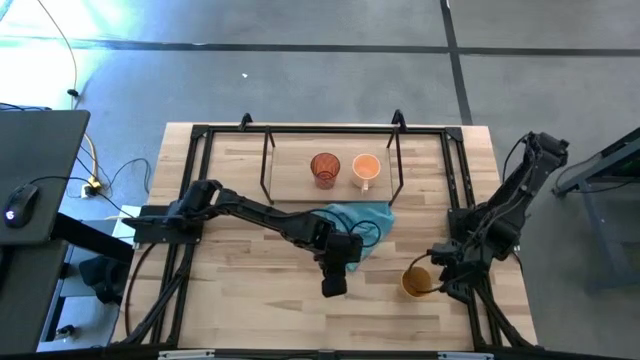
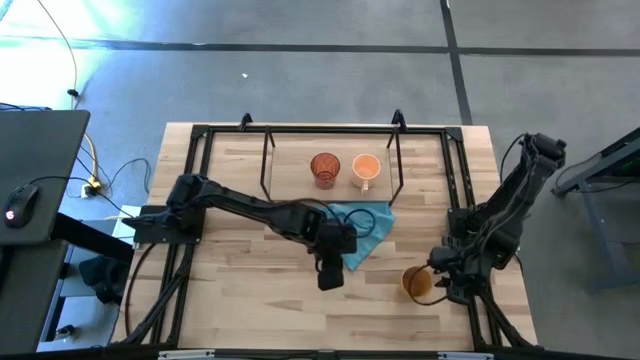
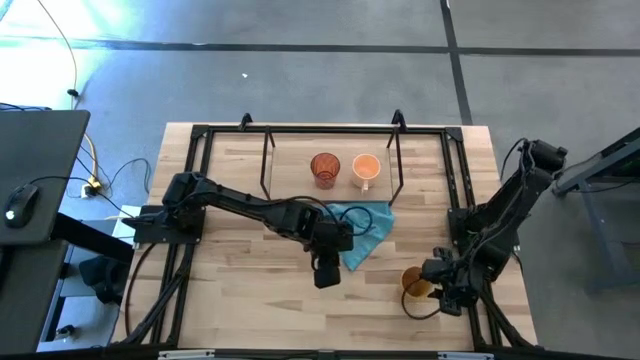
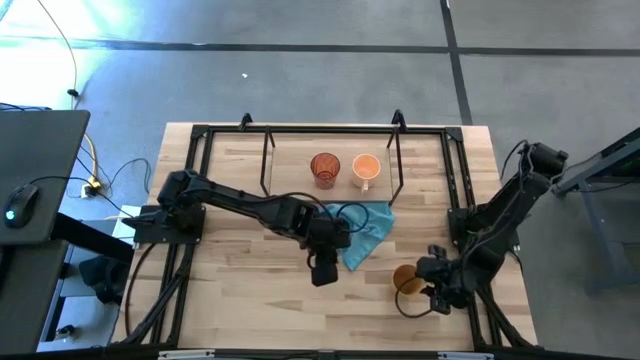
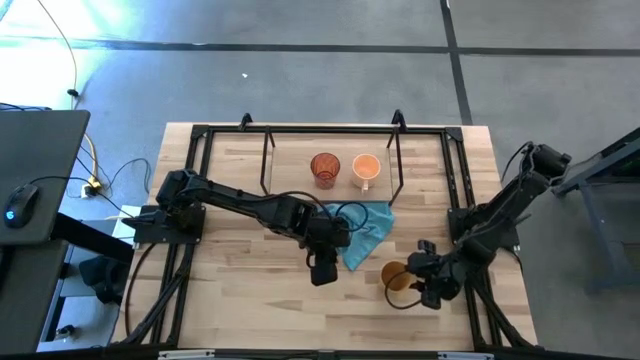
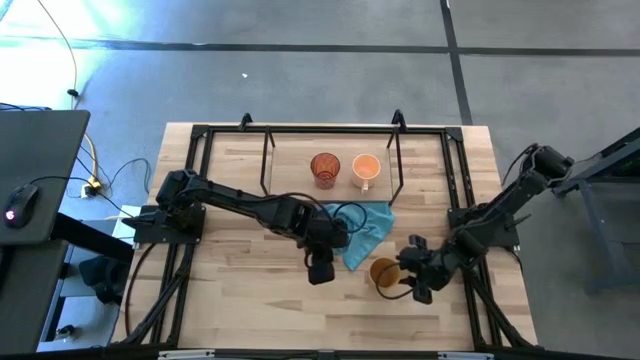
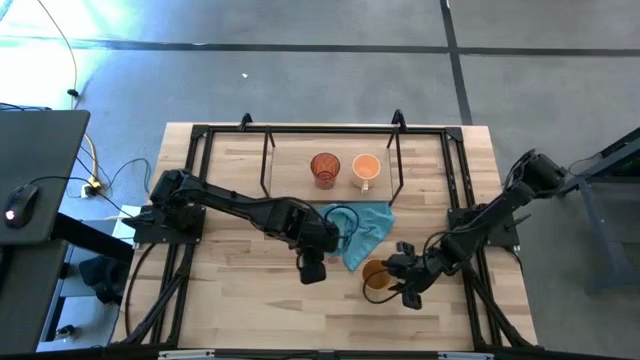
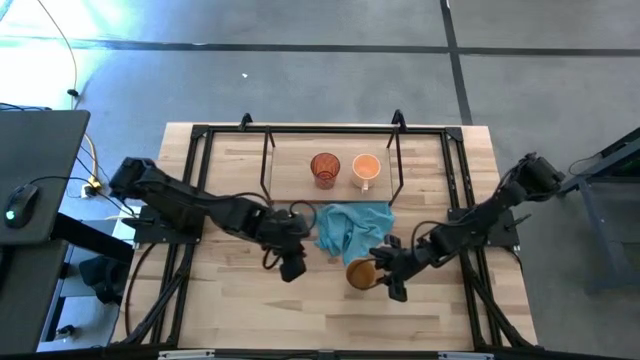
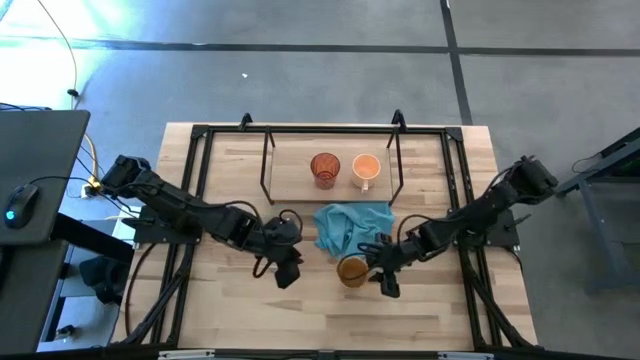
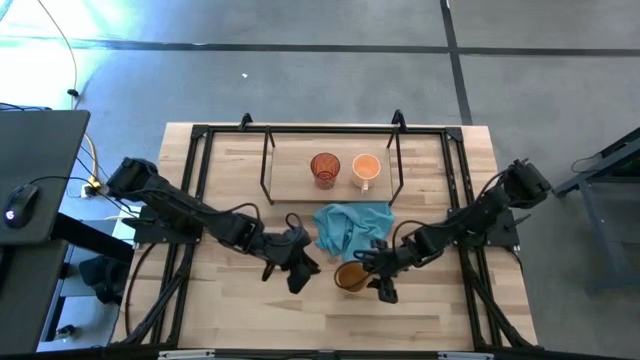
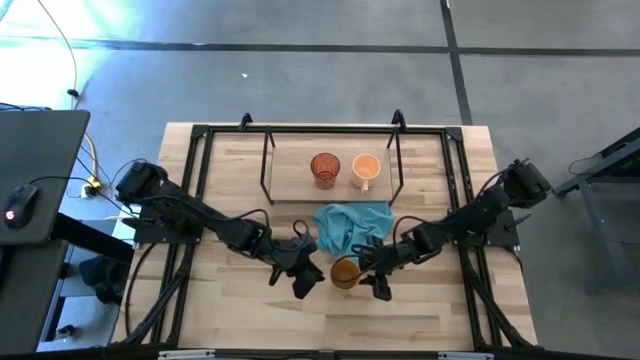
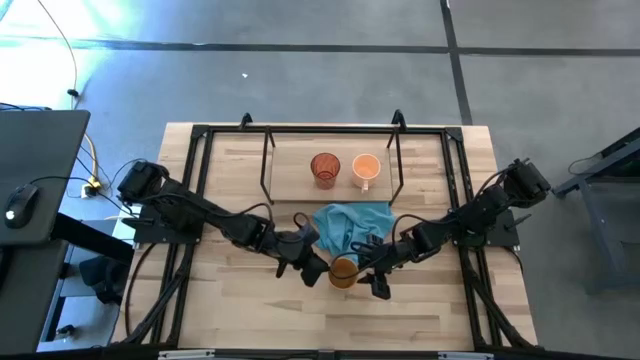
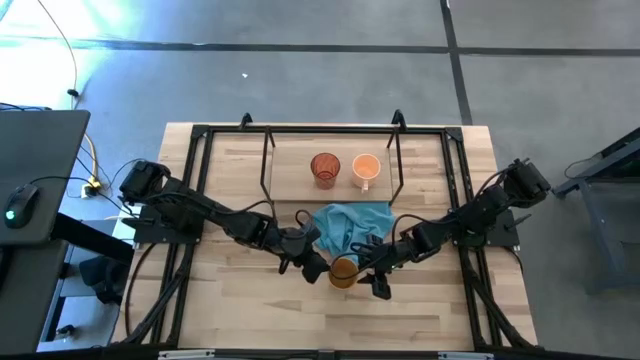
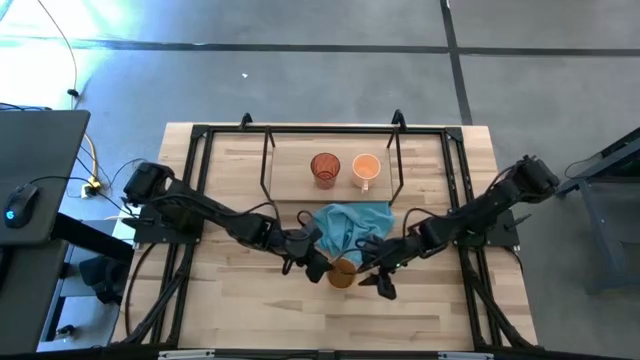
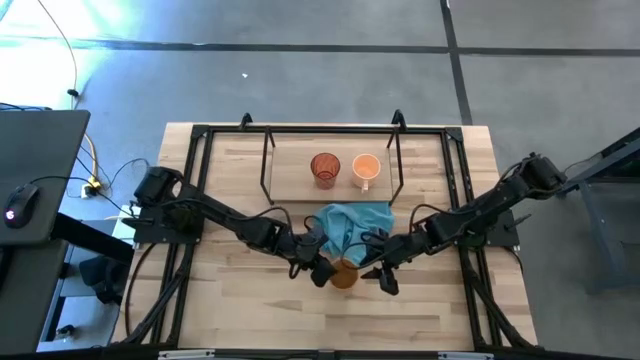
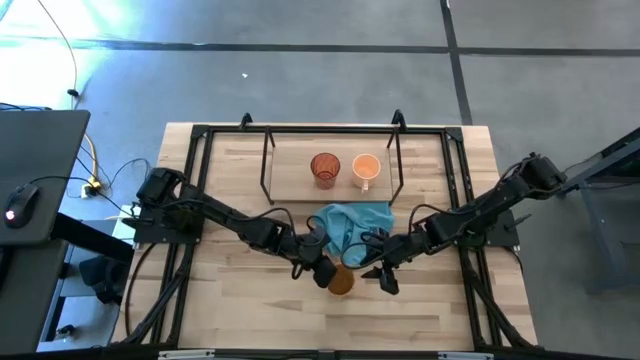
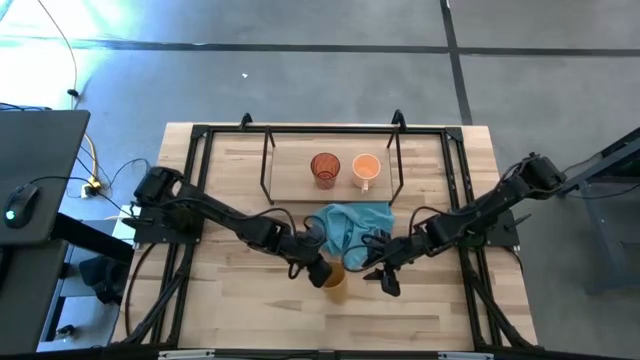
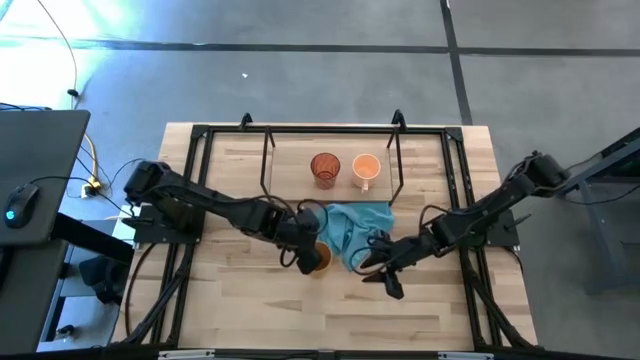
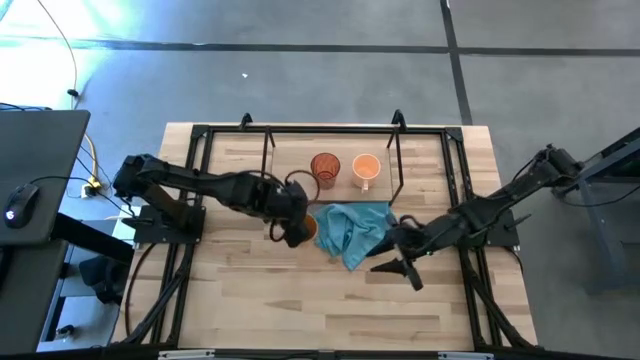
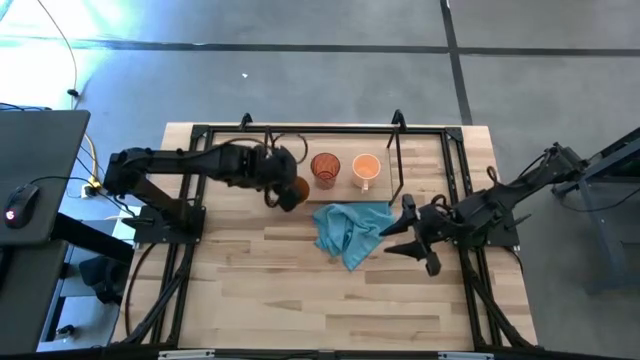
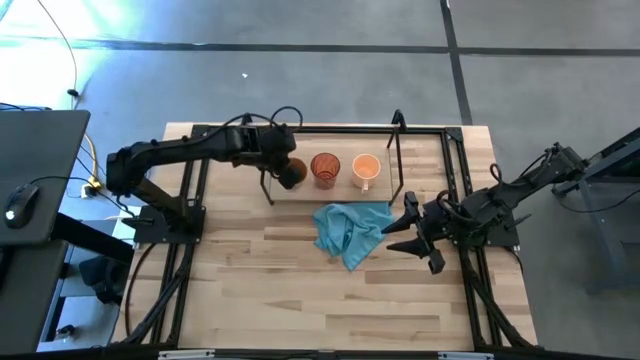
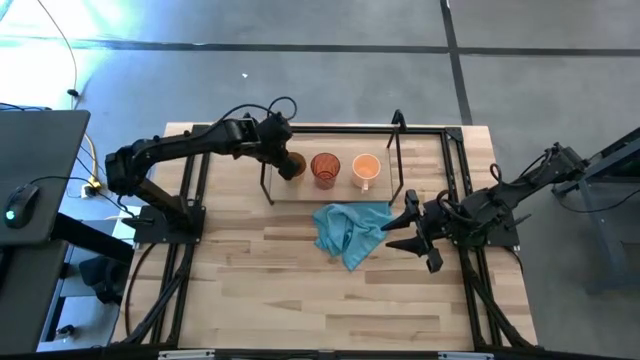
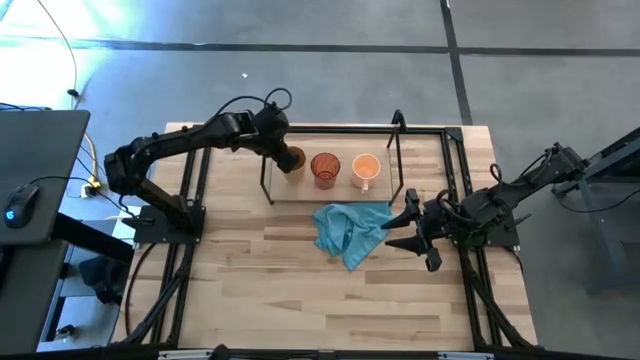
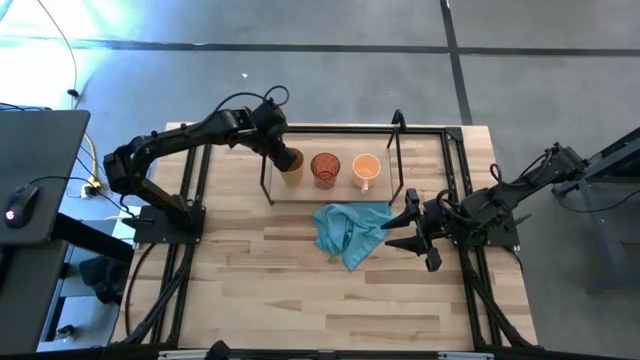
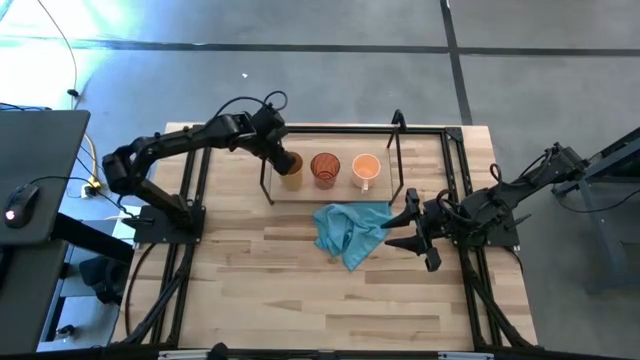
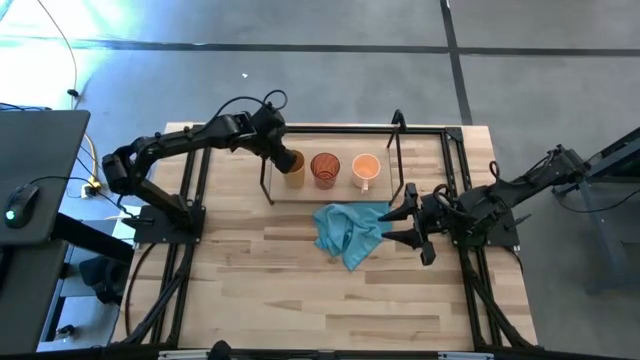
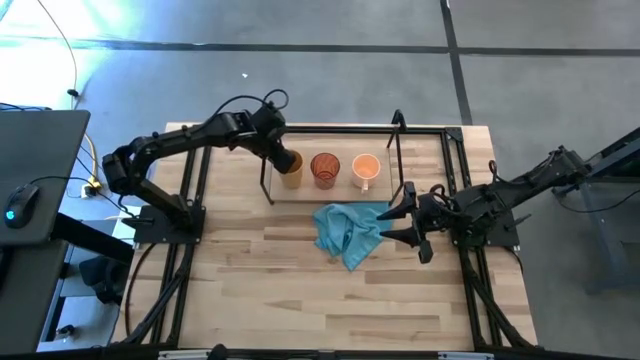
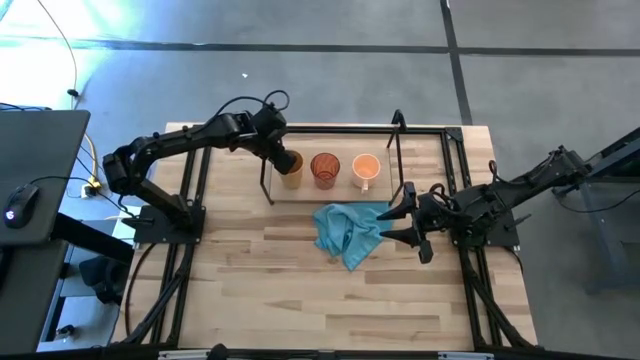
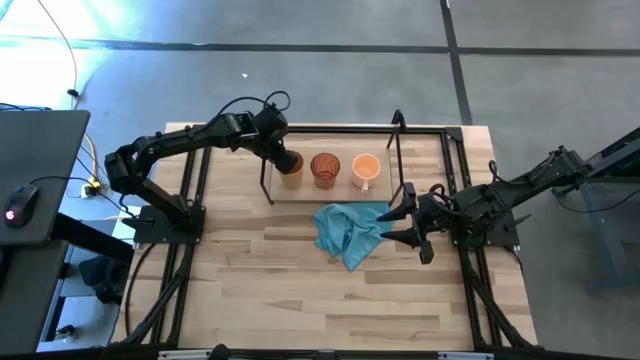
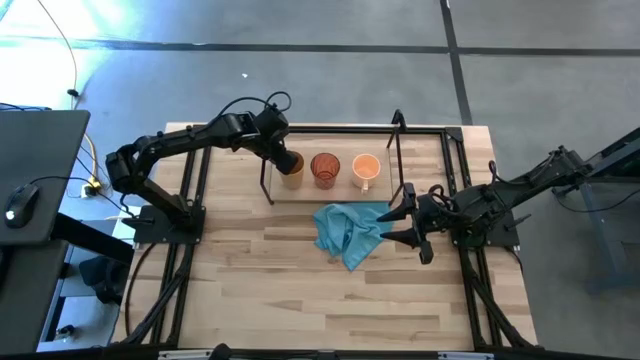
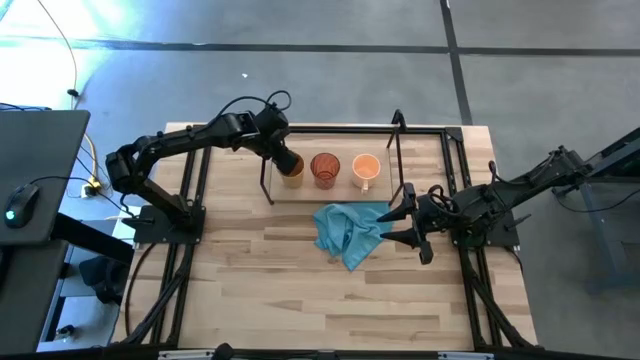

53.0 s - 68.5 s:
Task: Stack small to large cups/mugs on shelf
Put the yellow cup on the shelf

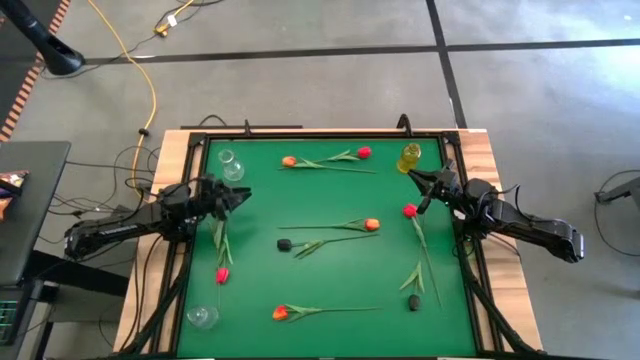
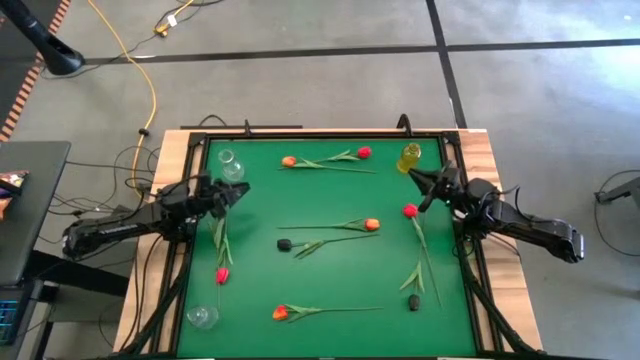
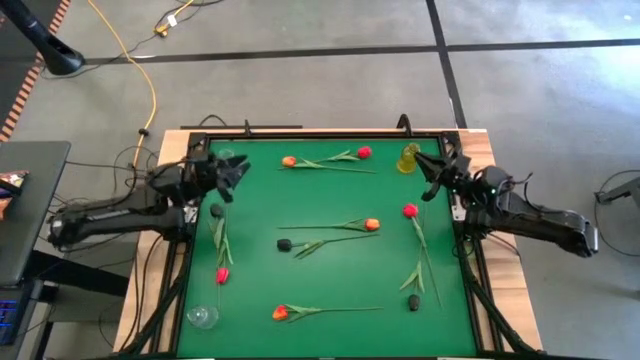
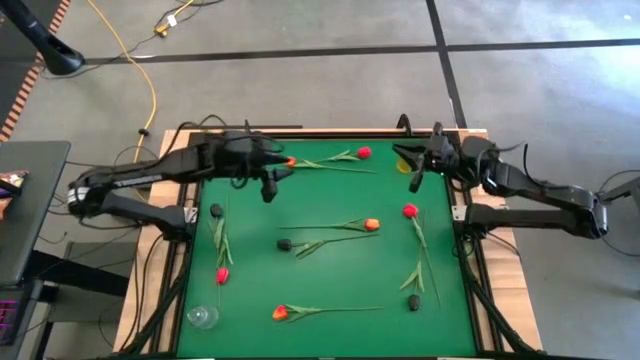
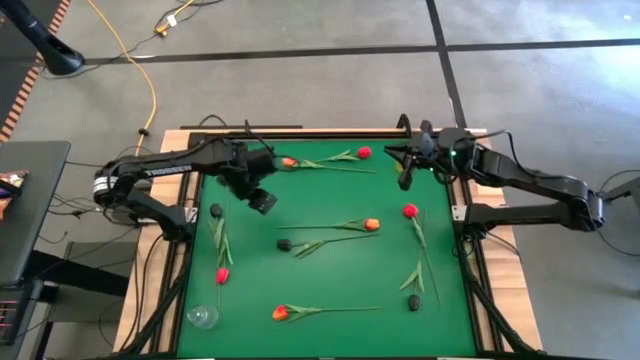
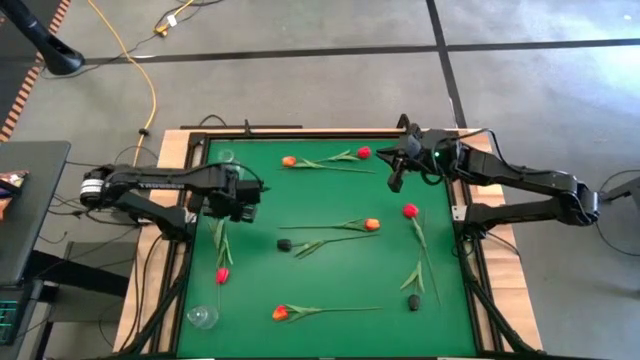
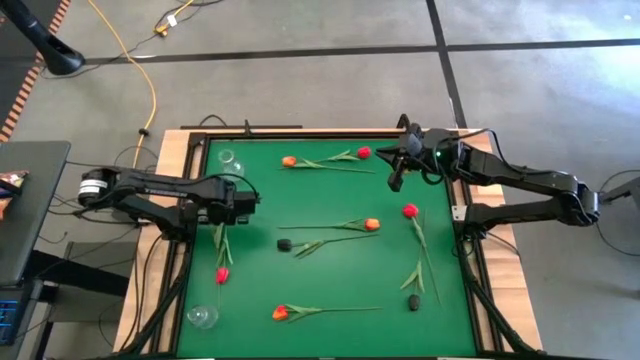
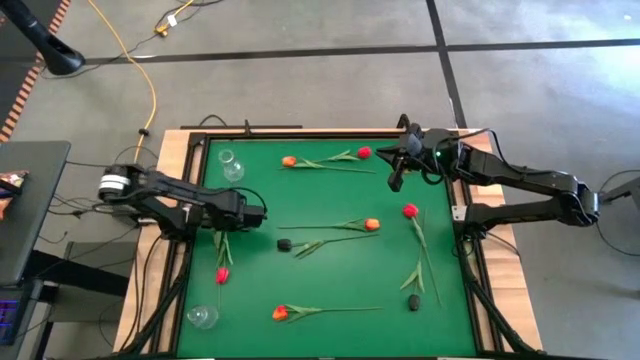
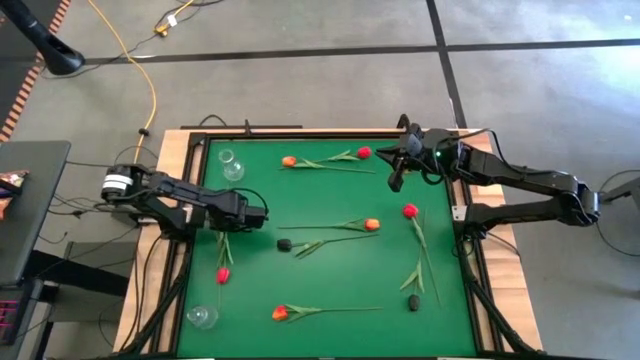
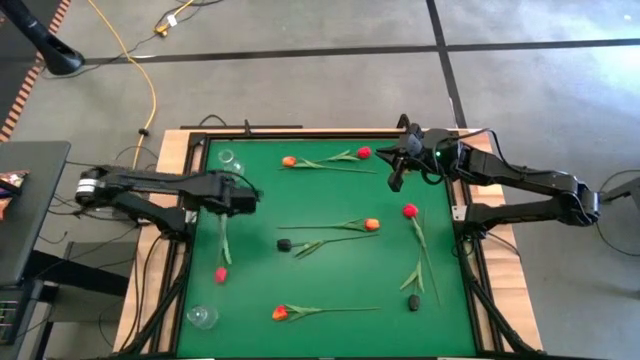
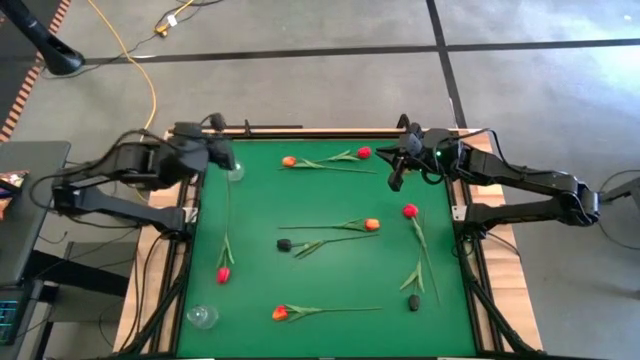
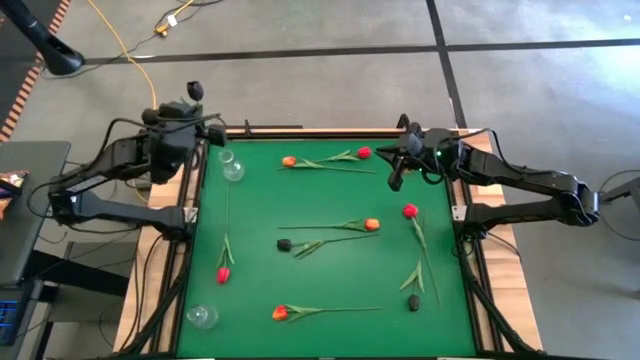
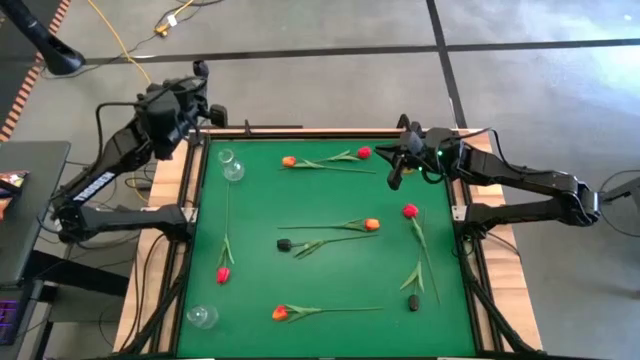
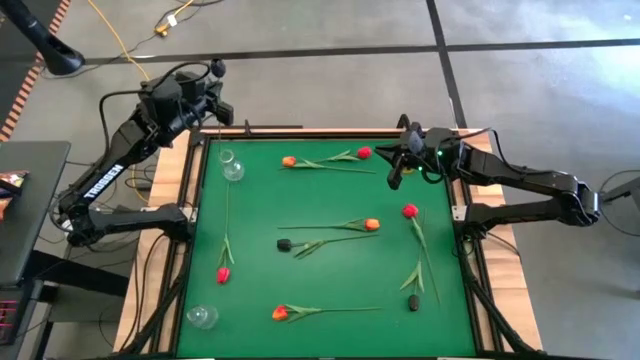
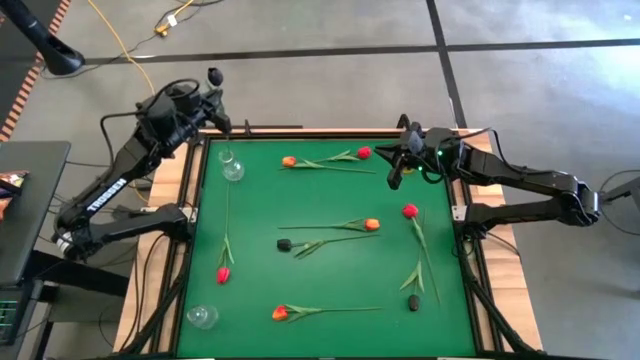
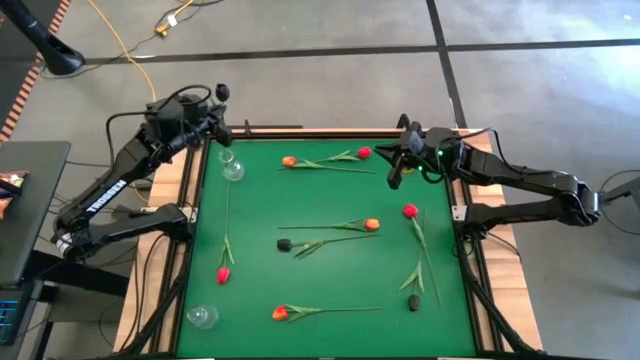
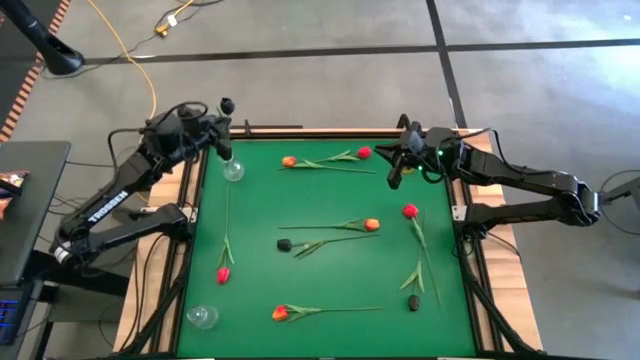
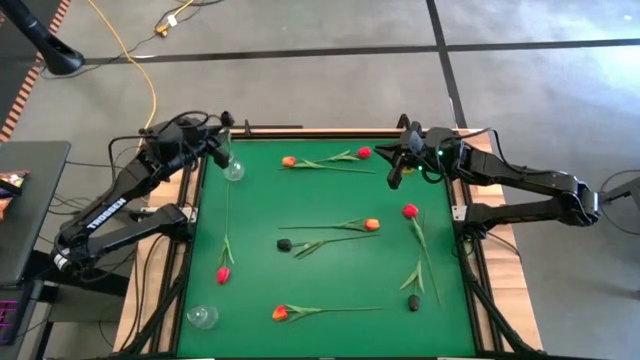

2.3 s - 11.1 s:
Task: Sort flowers into vase by color
Put the left black flower into the top transparent vase
